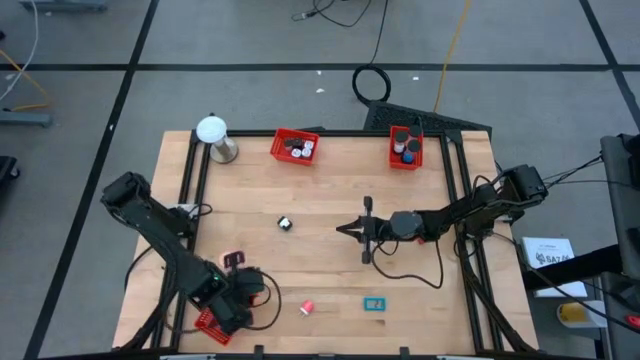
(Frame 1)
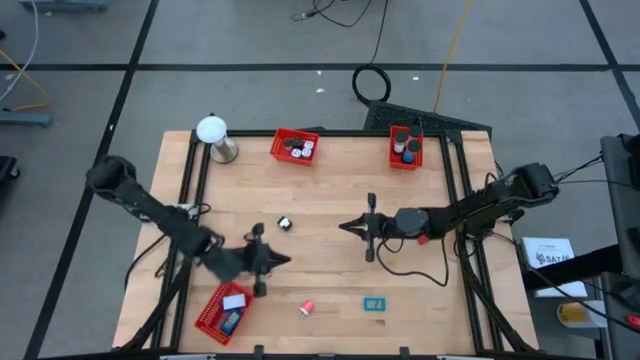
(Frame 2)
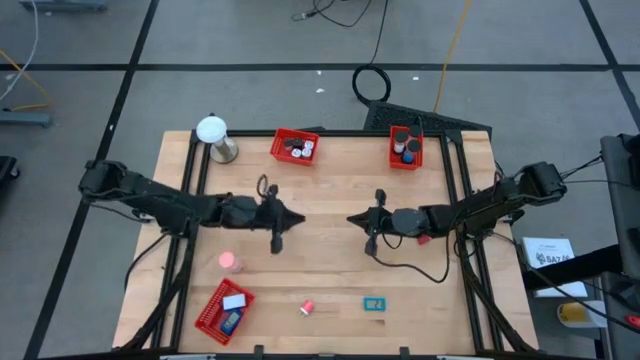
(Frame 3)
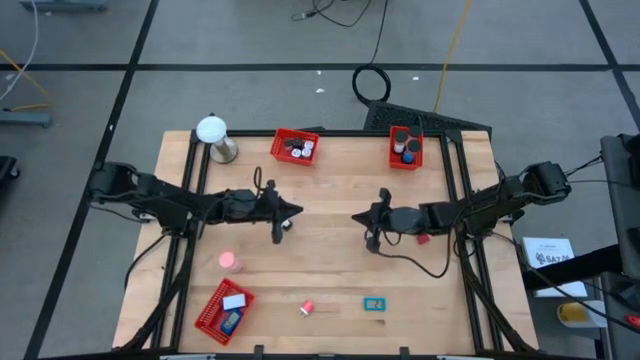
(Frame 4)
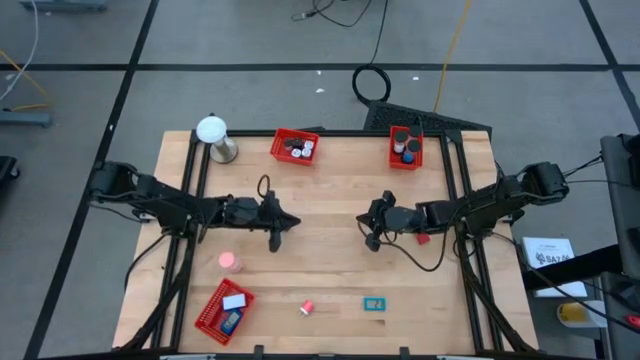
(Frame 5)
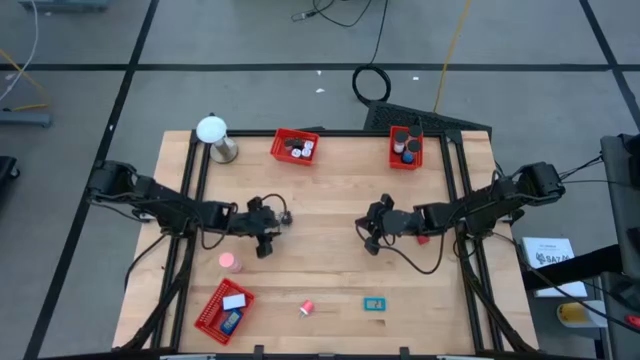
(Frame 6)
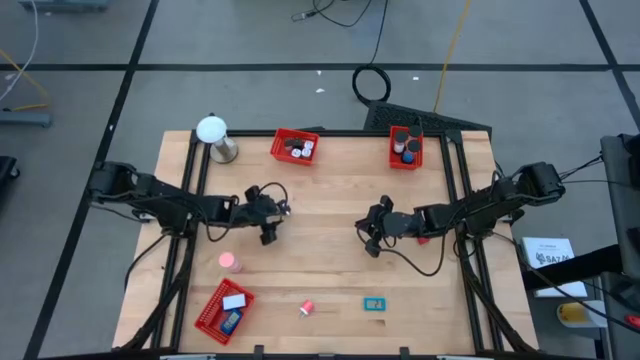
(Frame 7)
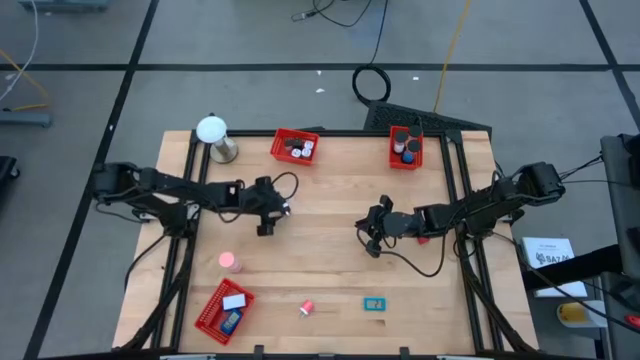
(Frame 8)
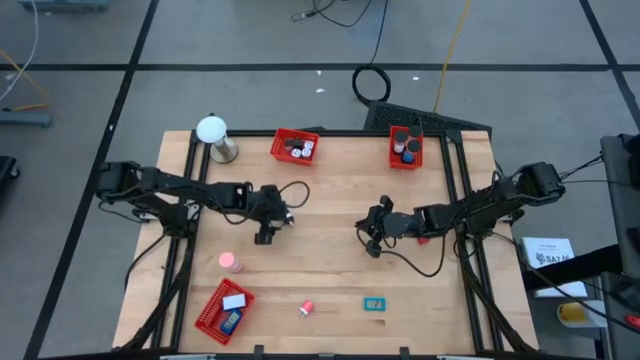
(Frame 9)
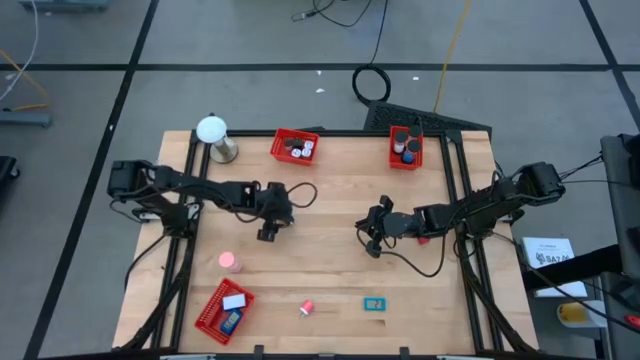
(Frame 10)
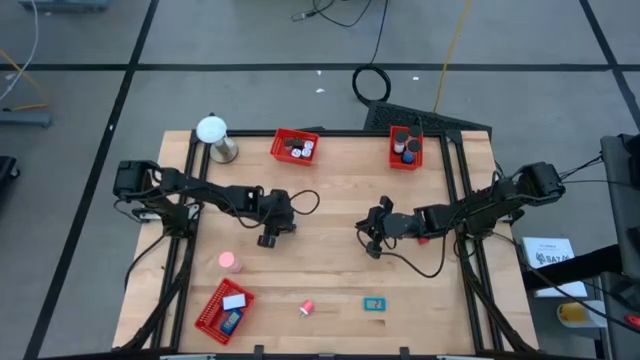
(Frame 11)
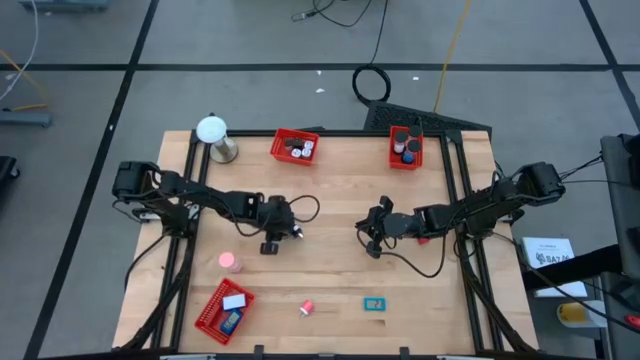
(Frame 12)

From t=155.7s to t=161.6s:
Task: Pick & Place Office items
Put the black charger adapter into the top left red basket

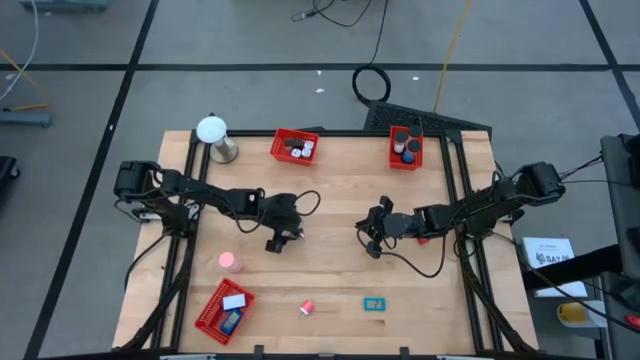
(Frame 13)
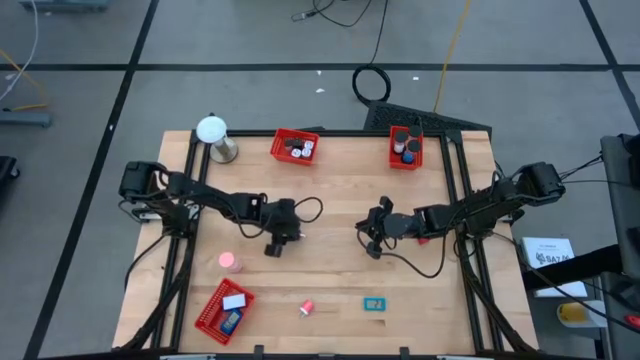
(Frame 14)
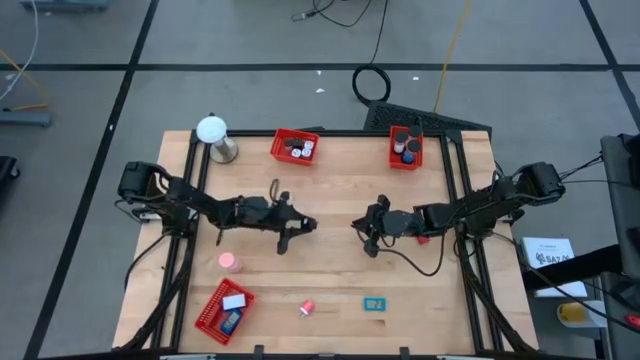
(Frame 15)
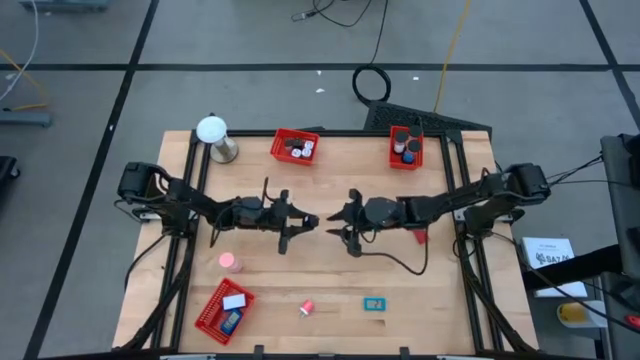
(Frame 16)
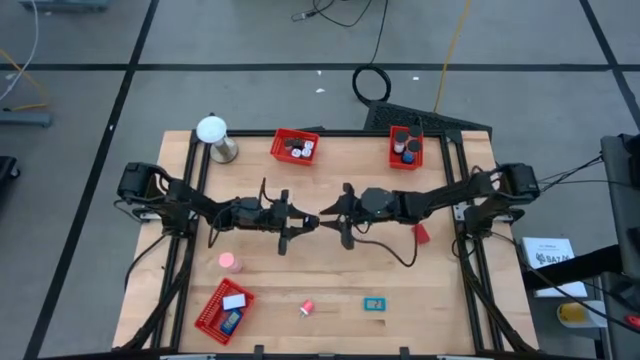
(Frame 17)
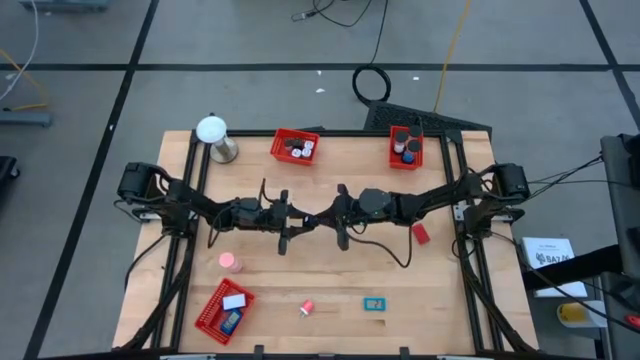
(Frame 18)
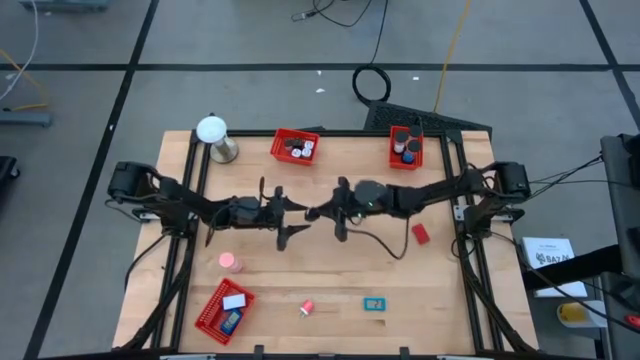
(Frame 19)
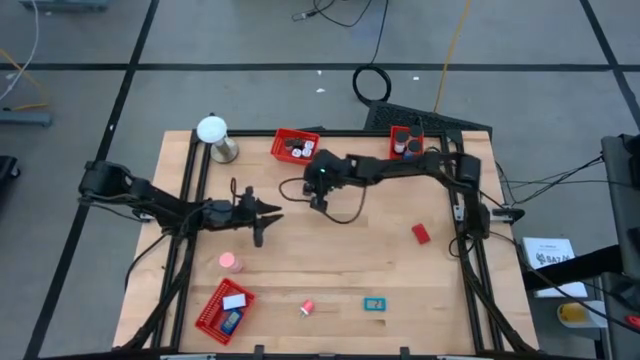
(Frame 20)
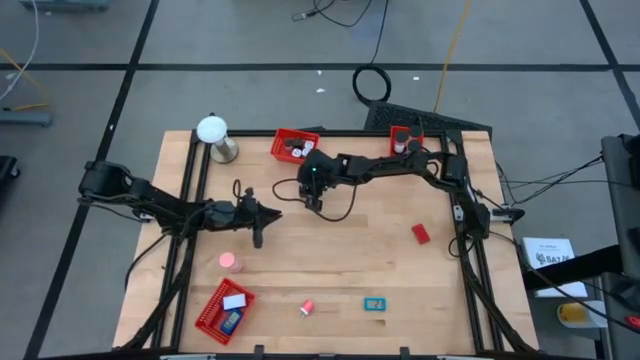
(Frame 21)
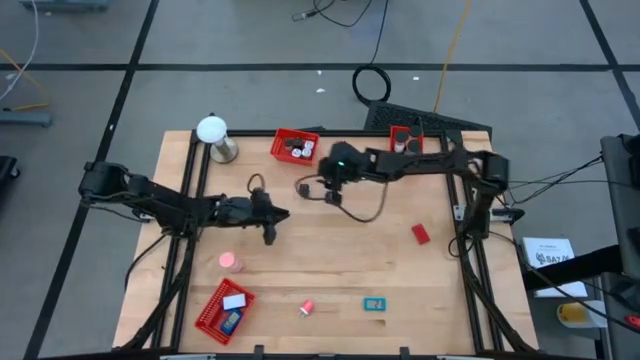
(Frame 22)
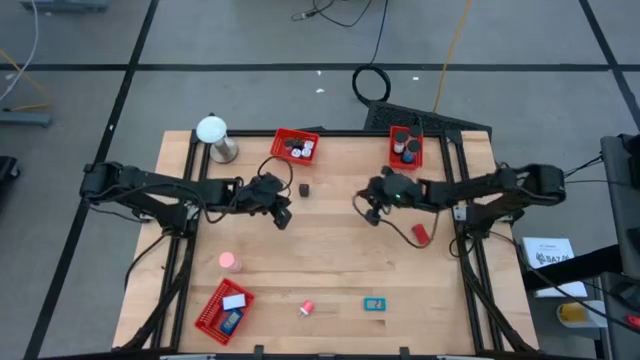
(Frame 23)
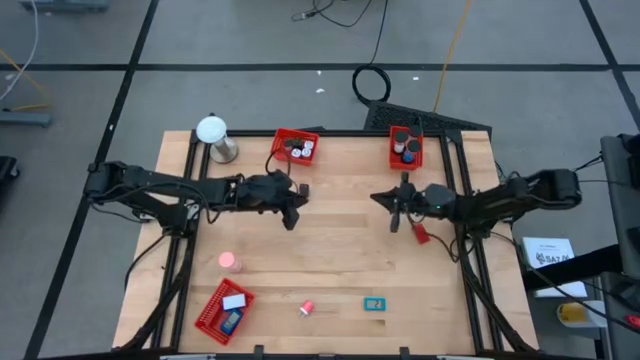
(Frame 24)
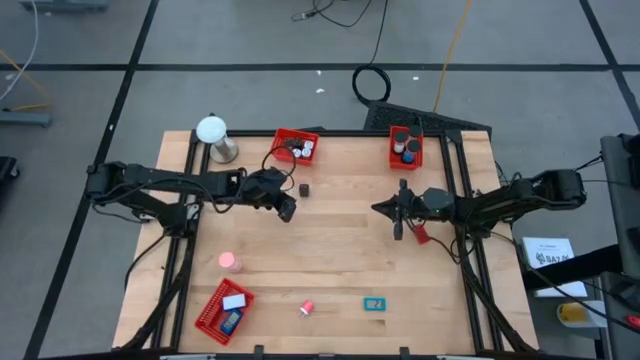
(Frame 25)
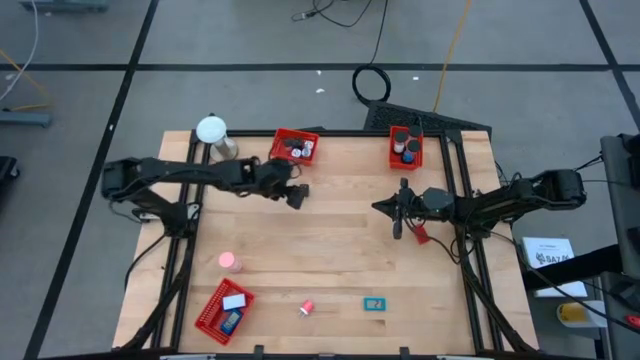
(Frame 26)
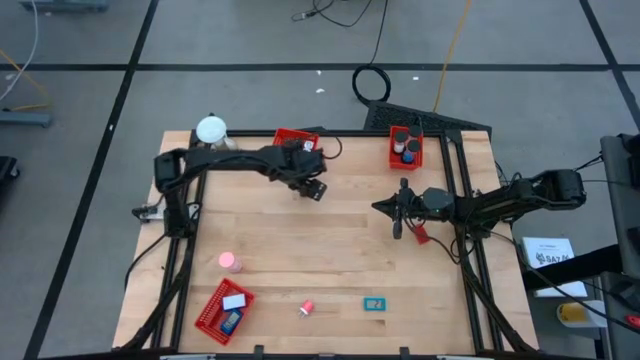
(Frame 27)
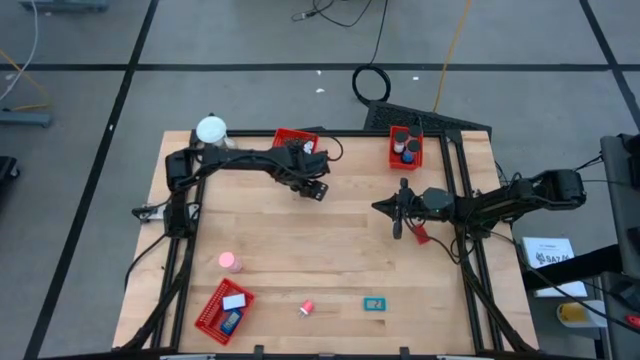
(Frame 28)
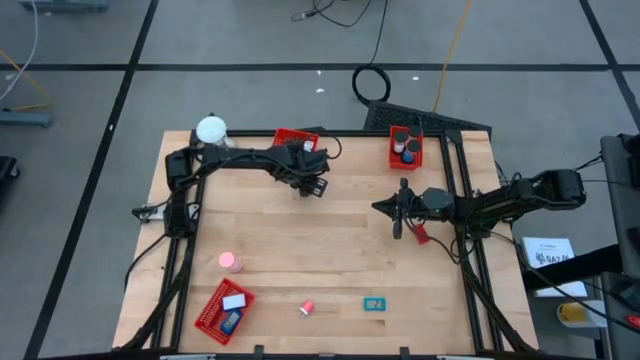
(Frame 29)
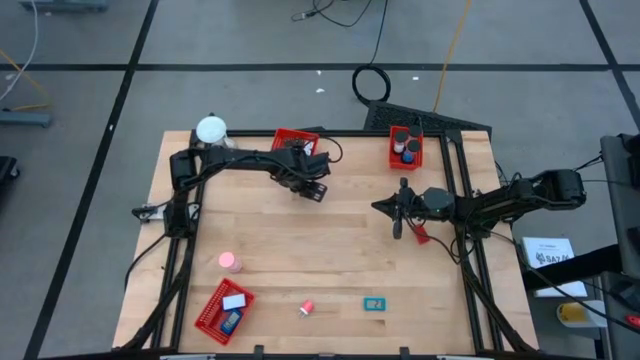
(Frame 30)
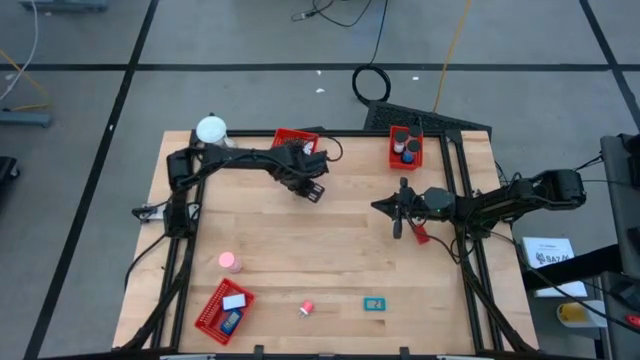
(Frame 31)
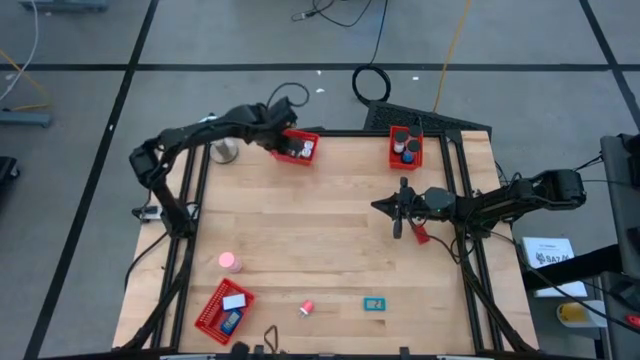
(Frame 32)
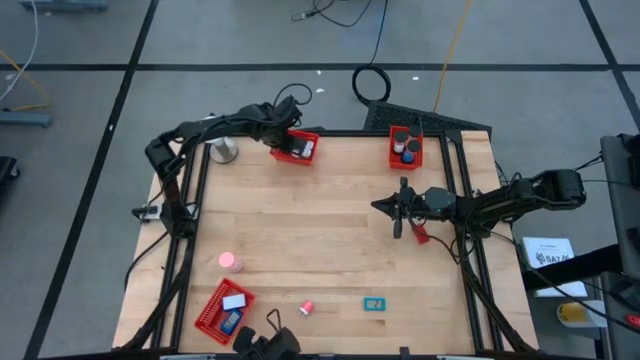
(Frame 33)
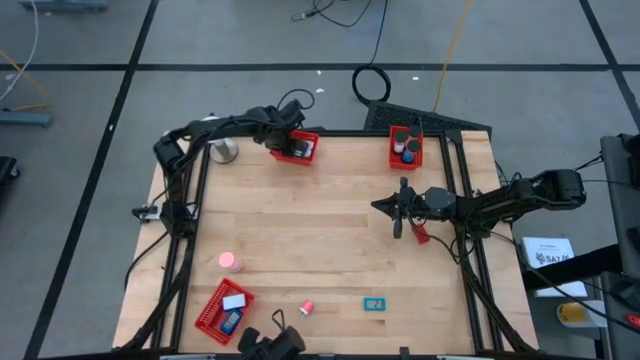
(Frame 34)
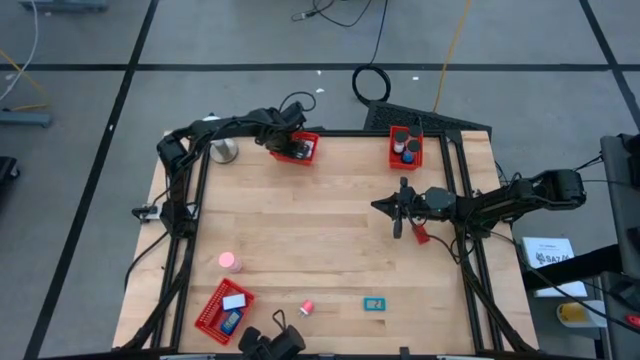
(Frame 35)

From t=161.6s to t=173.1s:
Put the black charger adapter into the top left red basket

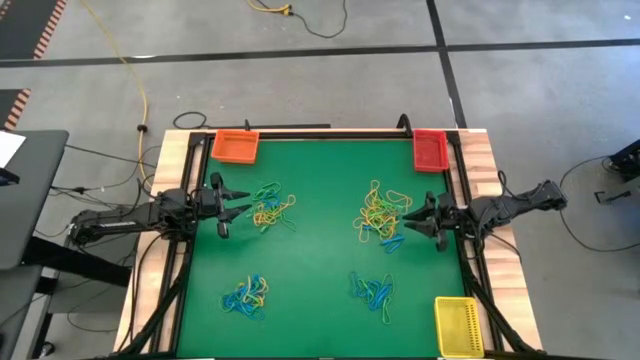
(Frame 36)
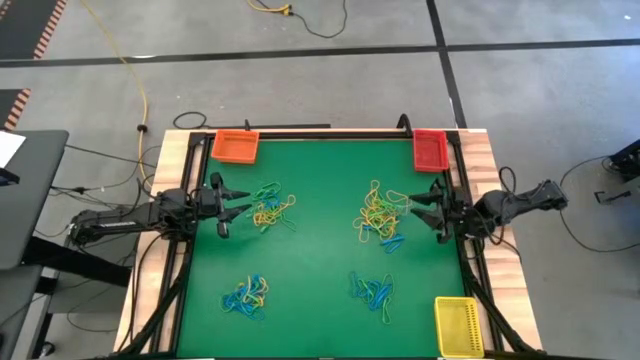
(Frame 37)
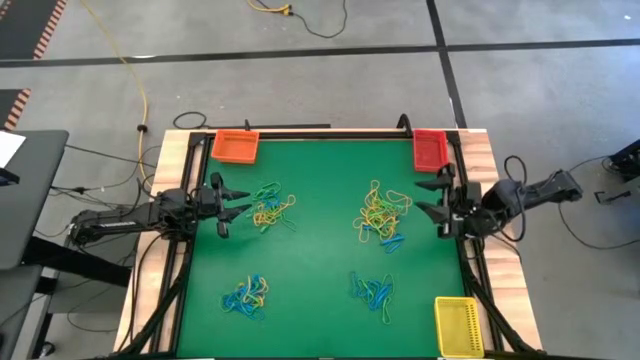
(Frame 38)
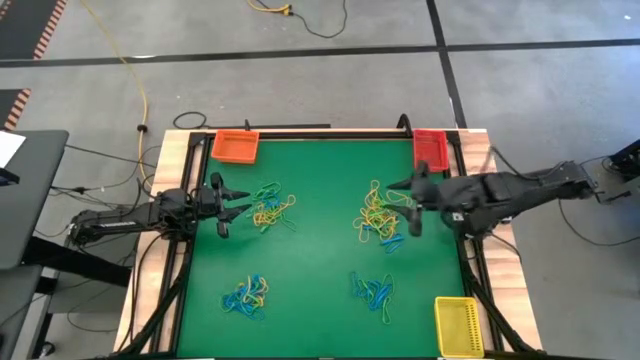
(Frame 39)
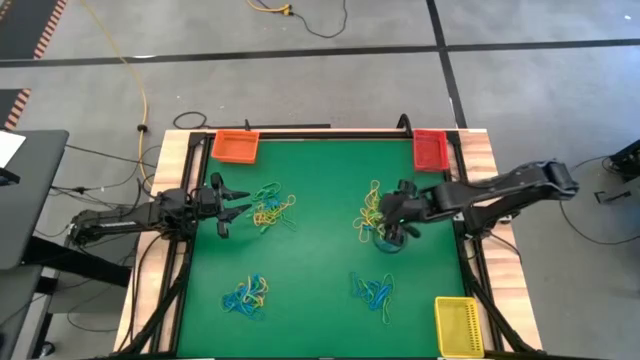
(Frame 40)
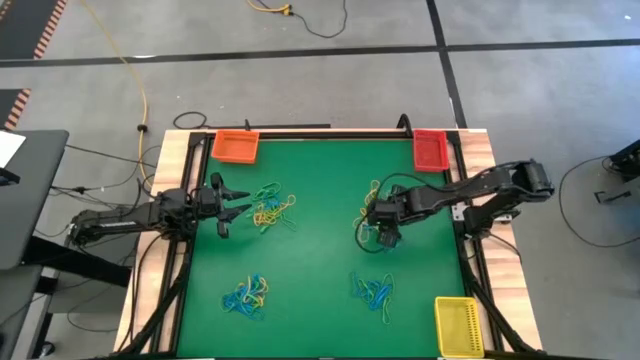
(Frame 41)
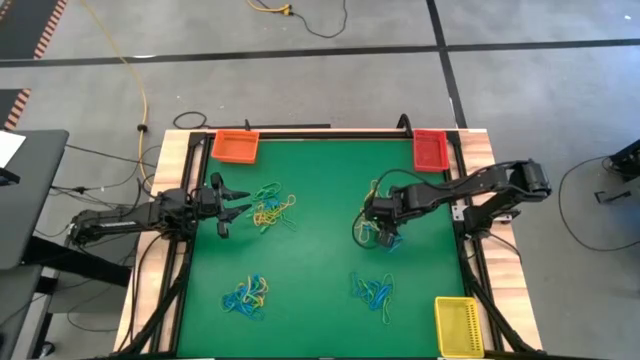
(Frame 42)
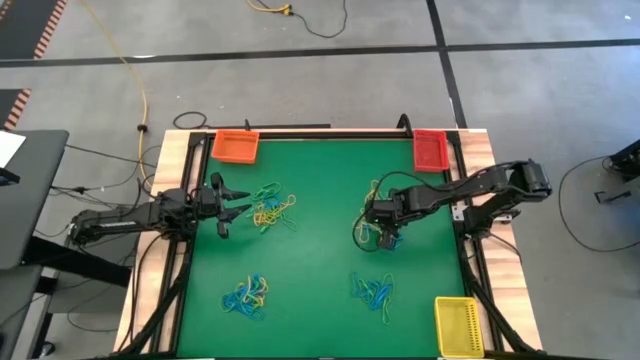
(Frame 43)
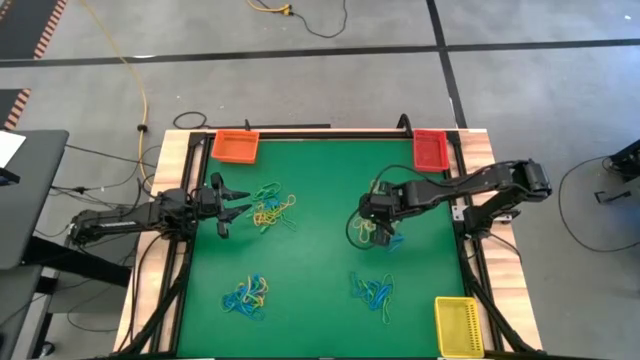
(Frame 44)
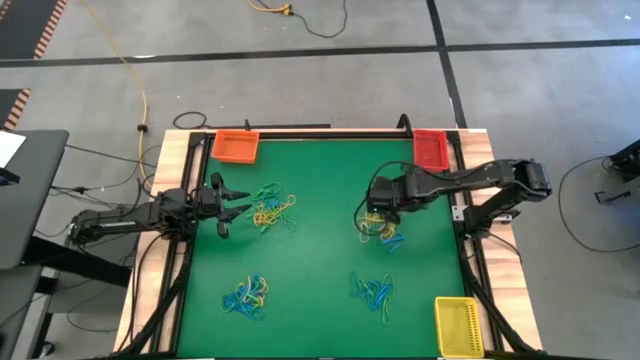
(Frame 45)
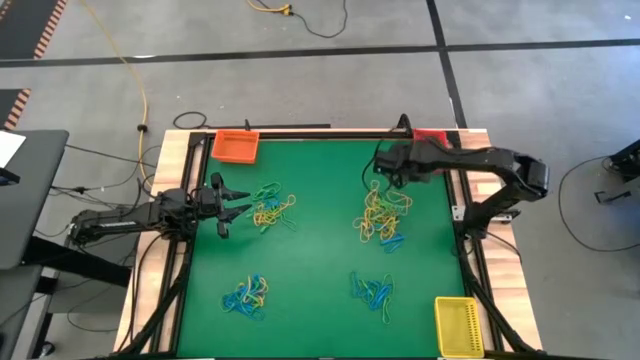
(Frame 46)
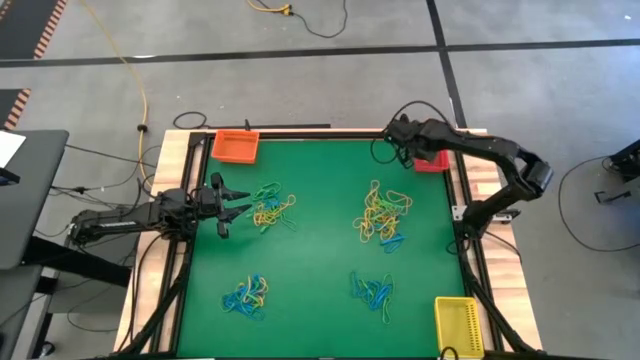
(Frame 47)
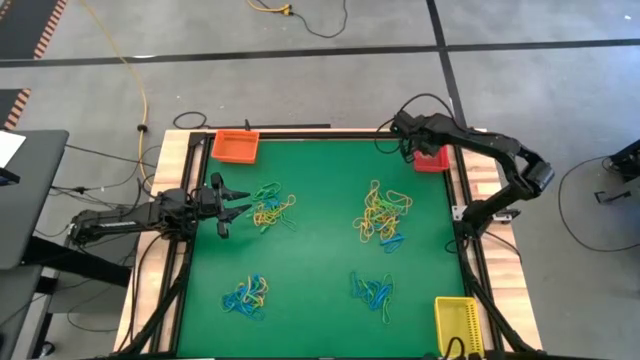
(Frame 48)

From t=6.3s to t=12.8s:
Task: Sort rubber bands into baskets
Put the top right green rubber band into the red bin
